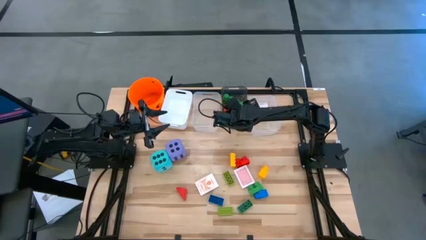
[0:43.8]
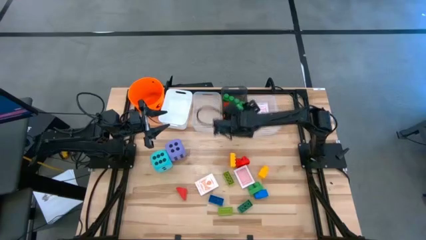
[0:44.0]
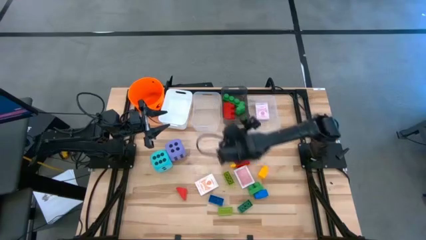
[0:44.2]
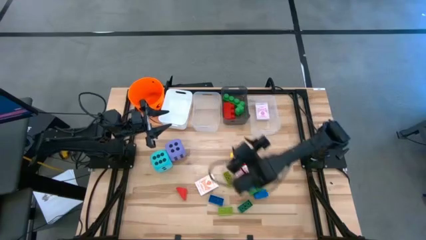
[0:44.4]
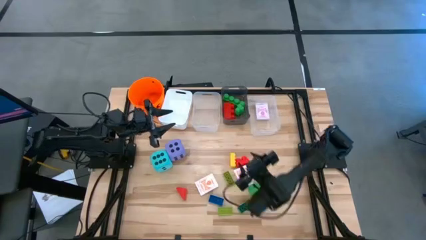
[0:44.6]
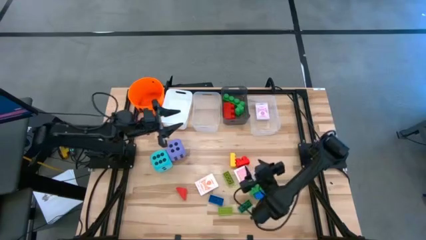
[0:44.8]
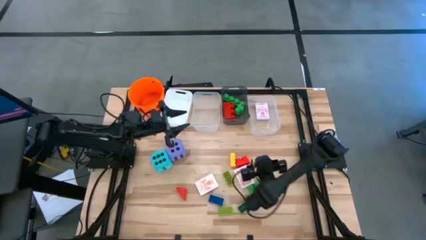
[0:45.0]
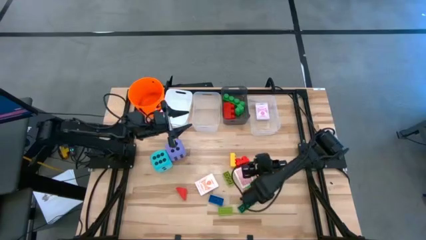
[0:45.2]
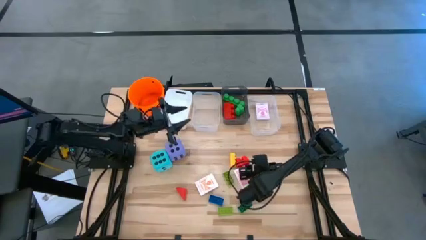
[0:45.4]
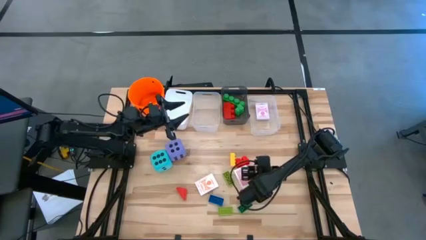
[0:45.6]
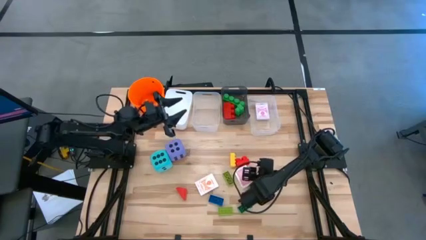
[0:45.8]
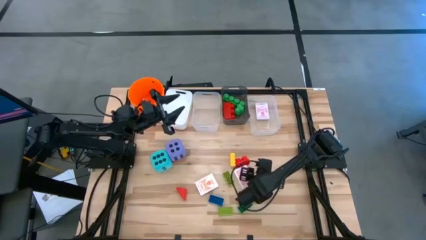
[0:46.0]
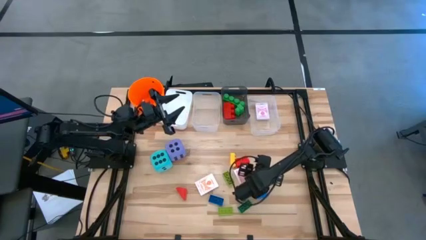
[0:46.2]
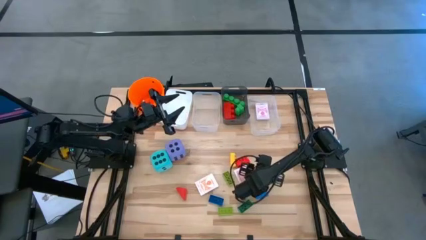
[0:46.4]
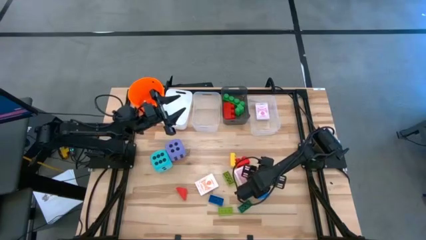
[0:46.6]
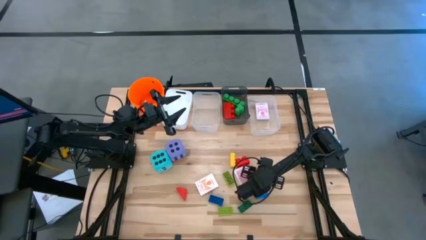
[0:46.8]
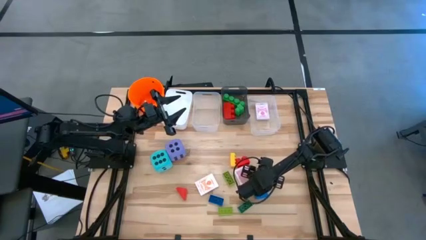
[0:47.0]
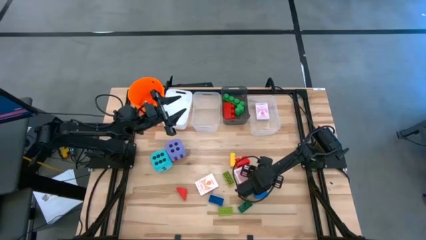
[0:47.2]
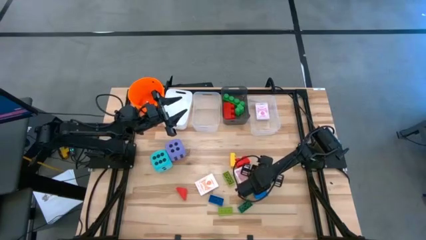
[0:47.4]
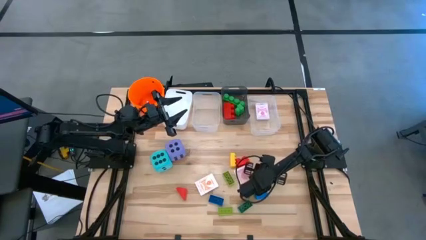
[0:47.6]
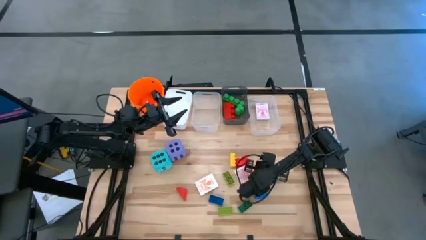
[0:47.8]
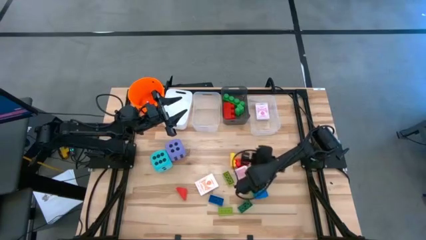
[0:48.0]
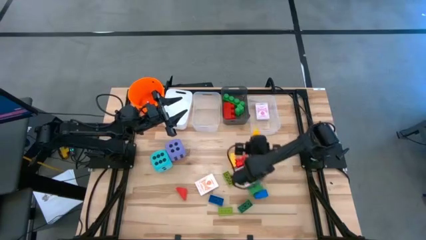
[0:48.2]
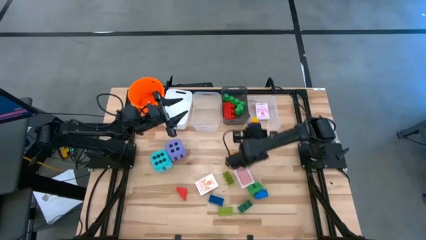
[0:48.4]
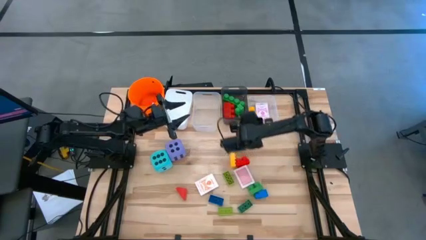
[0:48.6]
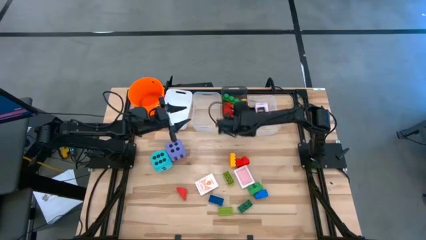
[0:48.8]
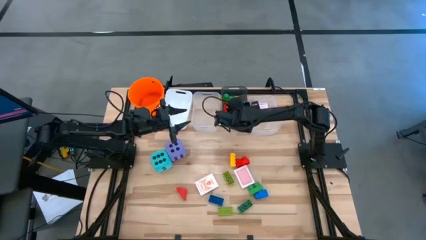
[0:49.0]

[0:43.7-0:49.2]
Task: Pick & Place Toys
Put the large yellow game piece into the black bin

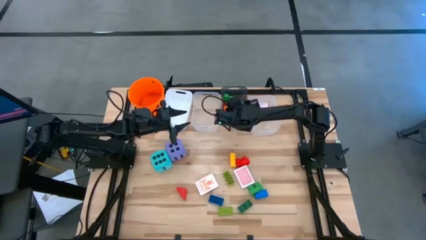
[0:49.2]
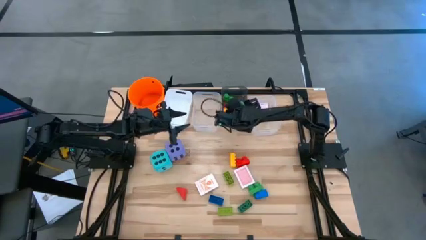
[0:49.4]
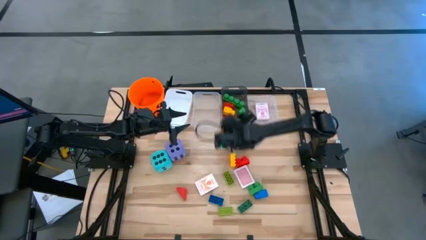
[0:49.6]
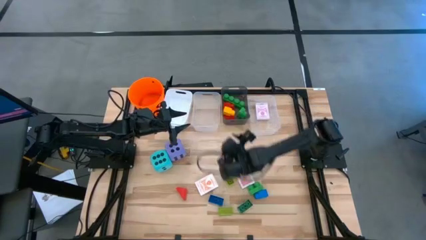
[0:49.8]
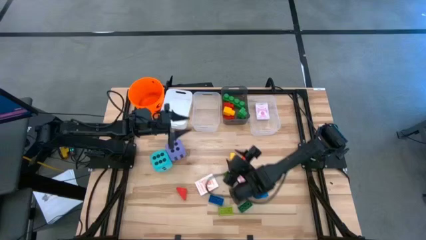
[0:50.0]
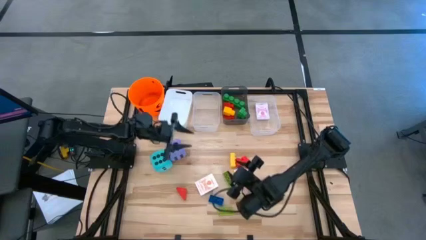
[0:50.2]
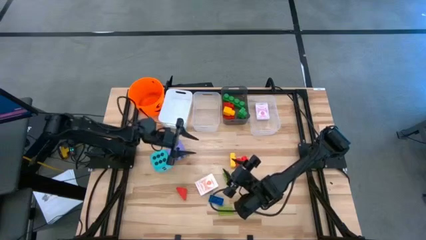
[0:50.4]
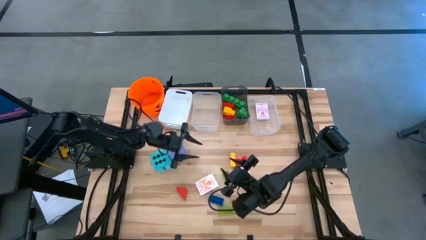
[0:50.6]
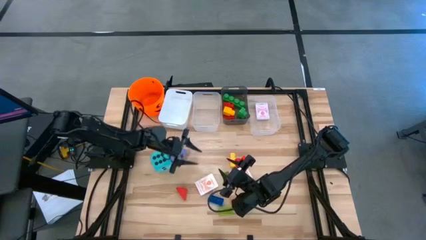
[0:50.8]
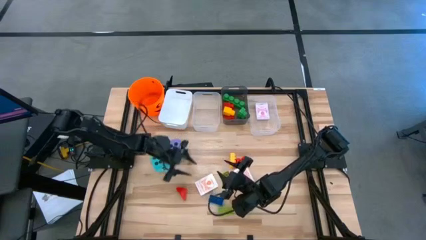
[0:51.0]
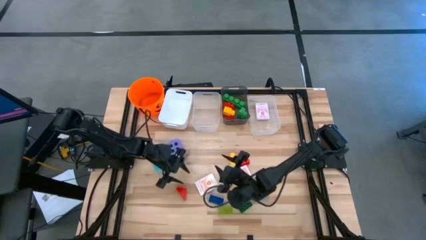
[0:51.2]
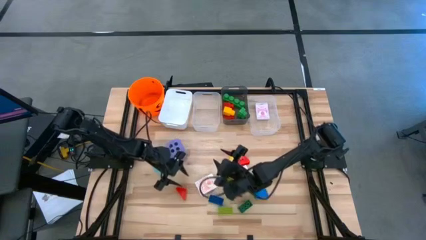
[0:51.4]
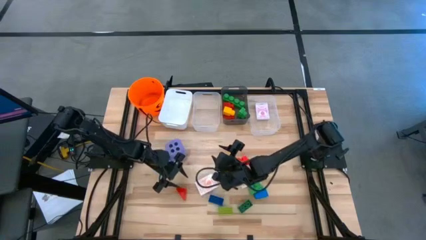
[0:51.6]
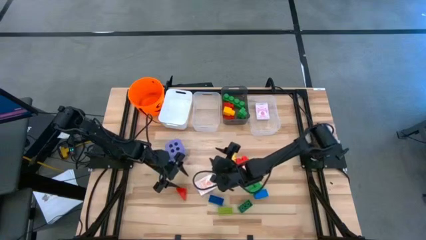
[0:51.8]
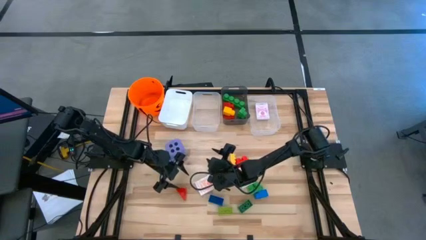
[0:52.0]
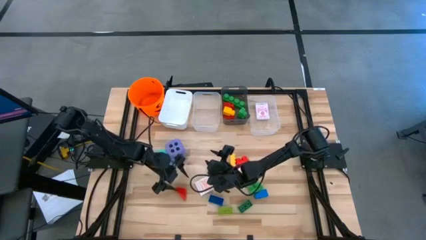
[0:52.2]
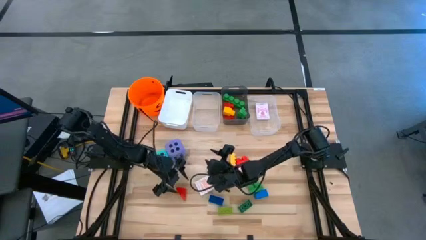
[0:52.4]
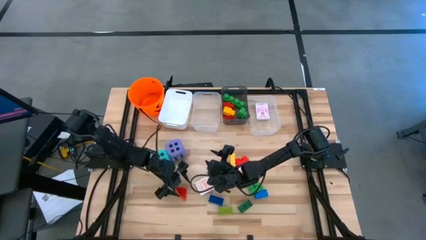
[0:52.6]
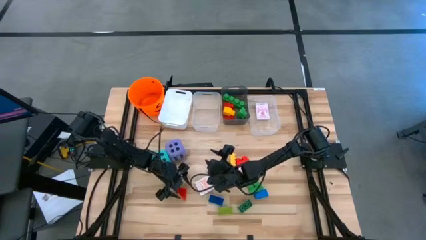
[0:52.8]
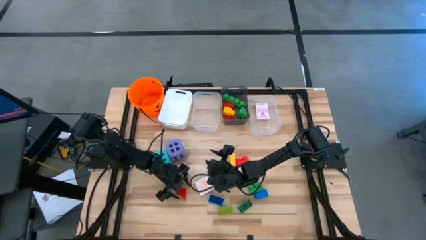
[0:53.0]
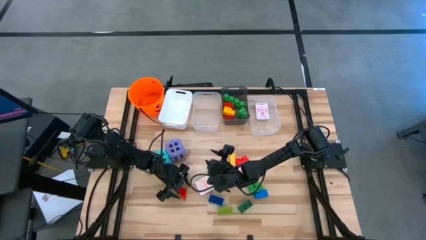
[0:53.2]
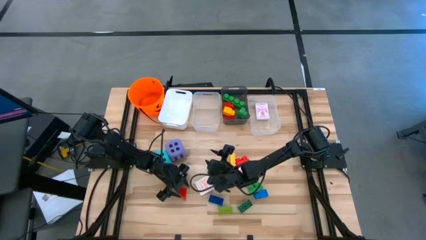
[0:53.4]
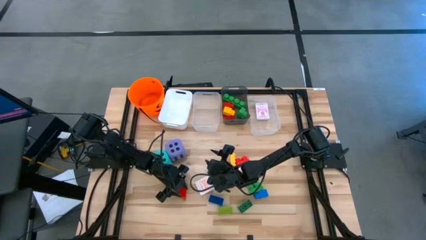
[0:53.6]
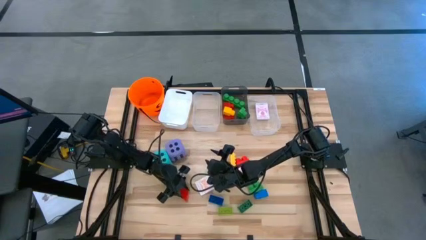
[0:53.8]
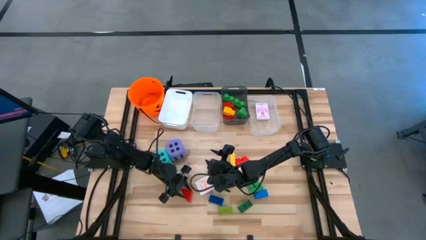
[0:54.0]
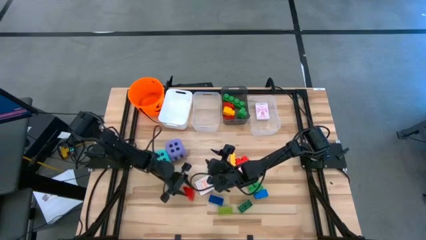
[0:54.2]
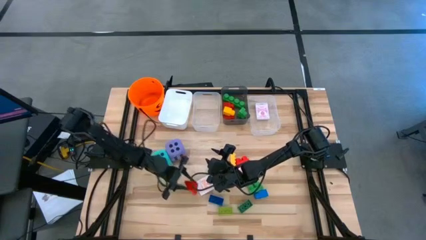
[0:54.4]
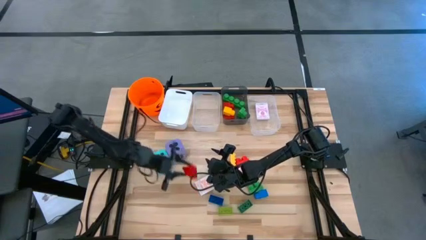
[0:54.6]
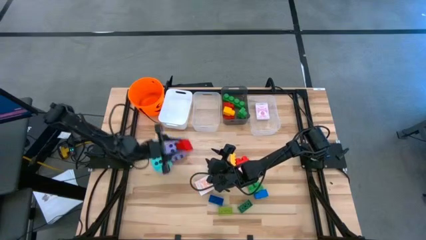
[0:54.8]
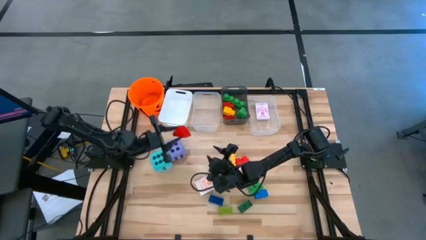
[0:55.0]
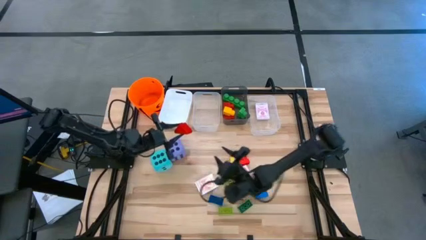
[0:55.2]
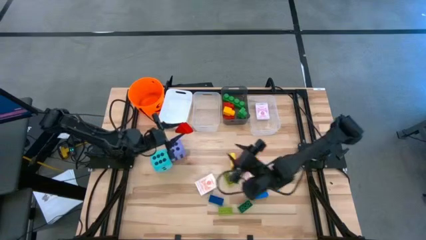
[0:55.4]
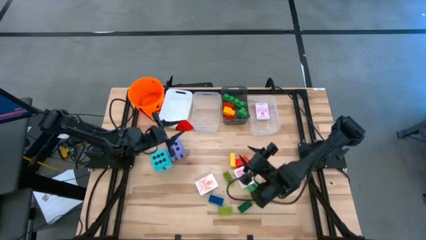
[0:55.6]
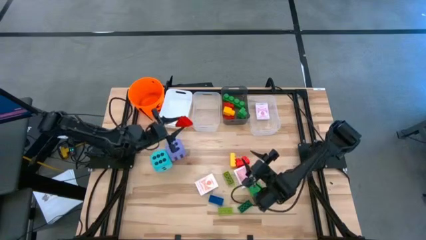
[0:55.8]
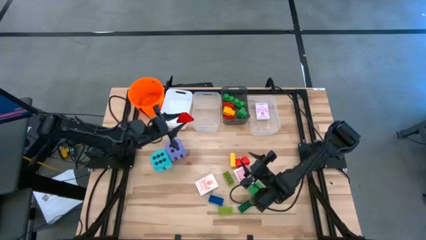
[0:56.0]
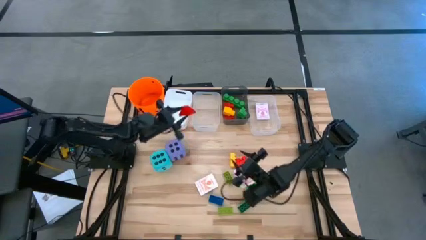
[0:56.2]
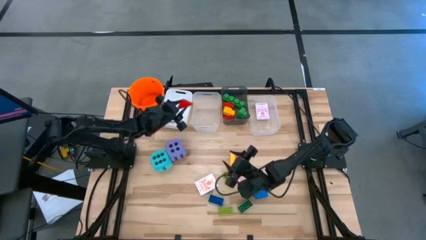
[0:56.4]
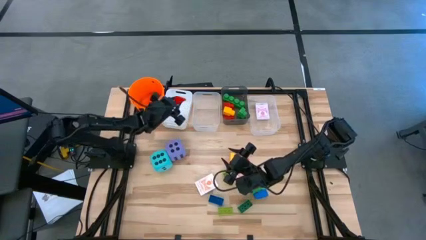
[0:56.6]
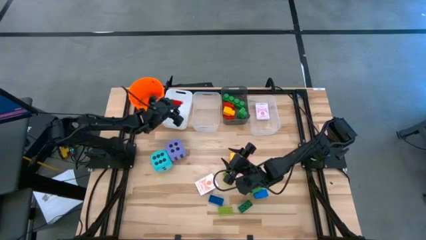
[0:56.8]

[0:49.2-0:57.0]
Put the small red game piece into the white bin

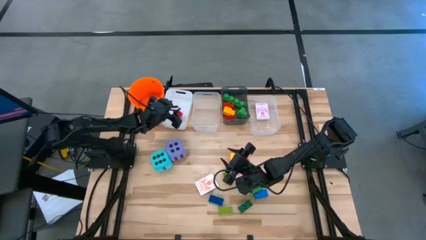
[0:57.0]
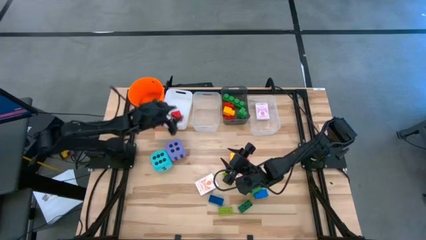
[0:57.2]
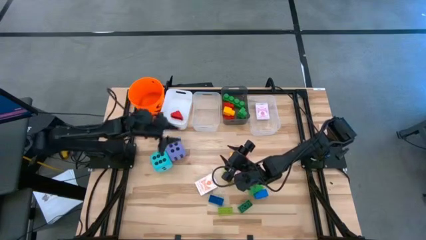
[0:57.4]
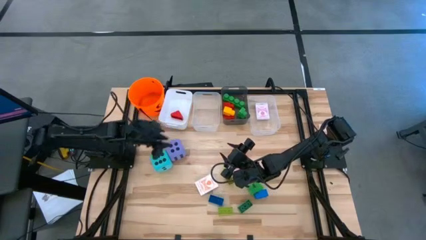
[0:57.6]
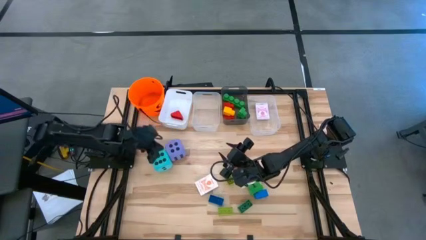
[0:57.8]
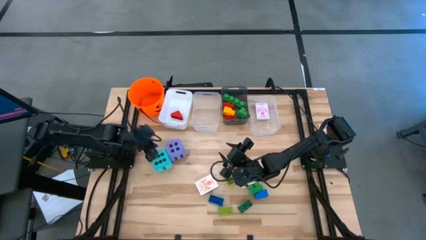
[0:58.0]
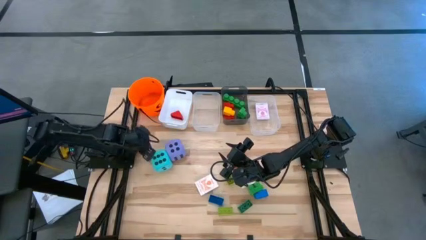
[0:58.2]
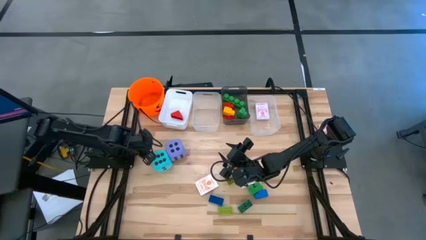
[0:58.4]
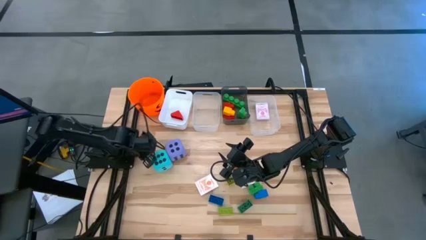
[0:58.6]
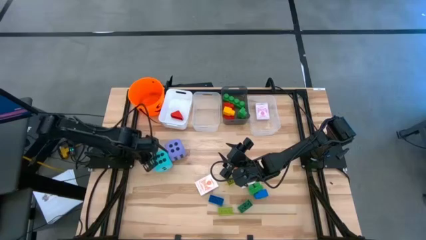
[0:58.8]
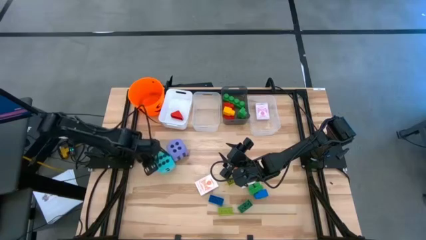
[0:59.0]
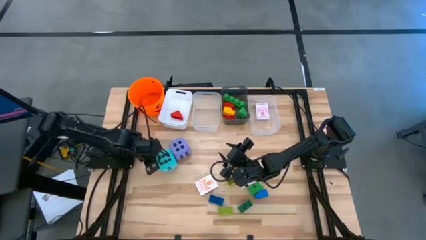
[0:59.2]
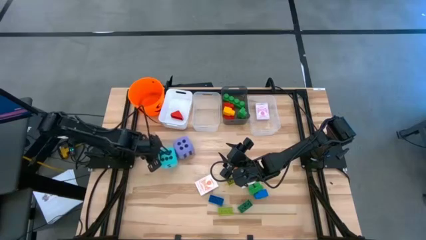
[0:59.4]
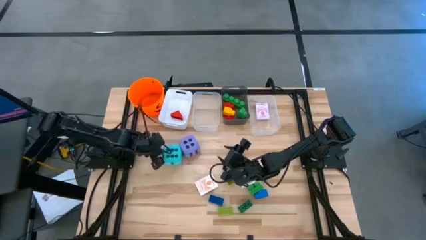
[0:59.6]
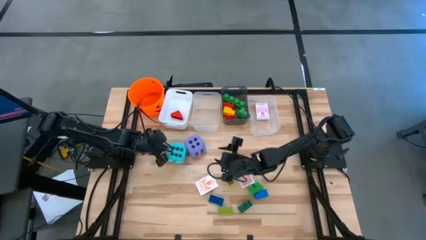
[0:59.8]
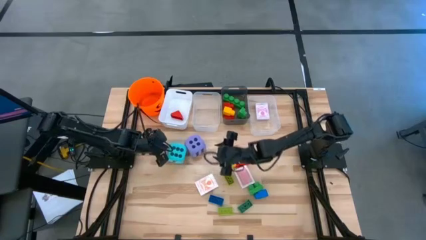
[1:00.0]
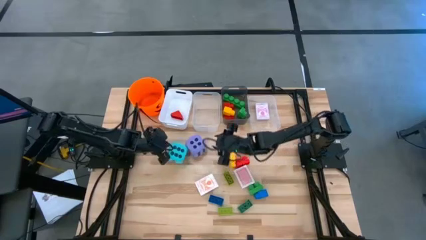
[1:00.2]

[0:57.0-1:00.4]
Adjust the dice
